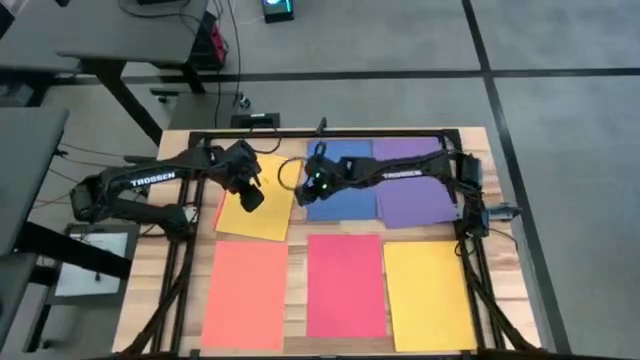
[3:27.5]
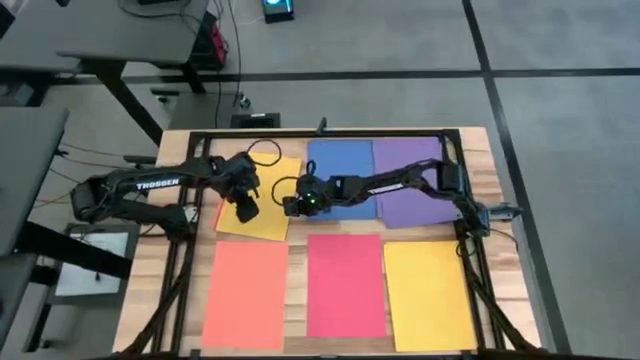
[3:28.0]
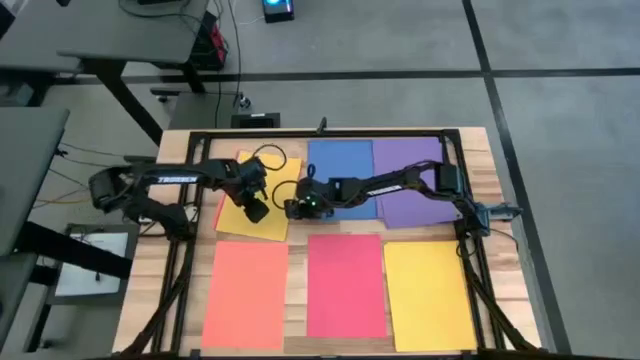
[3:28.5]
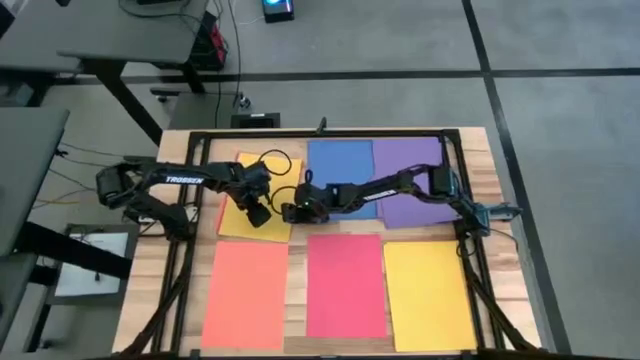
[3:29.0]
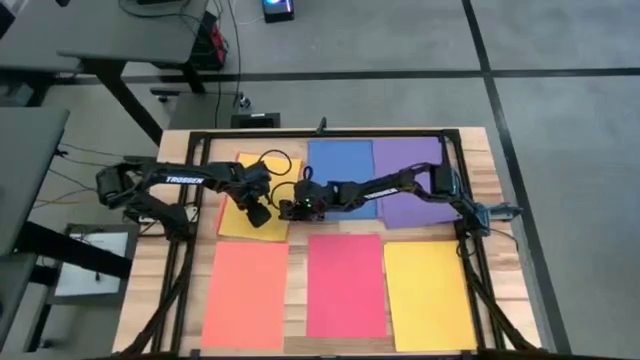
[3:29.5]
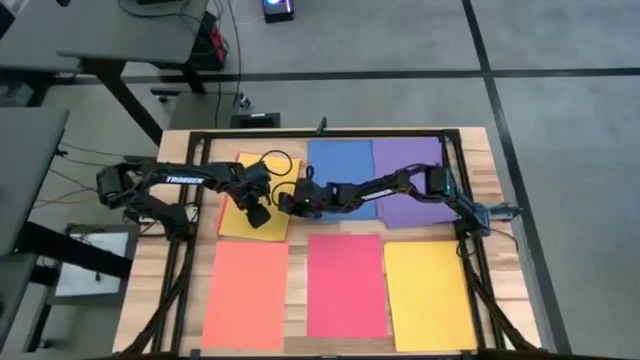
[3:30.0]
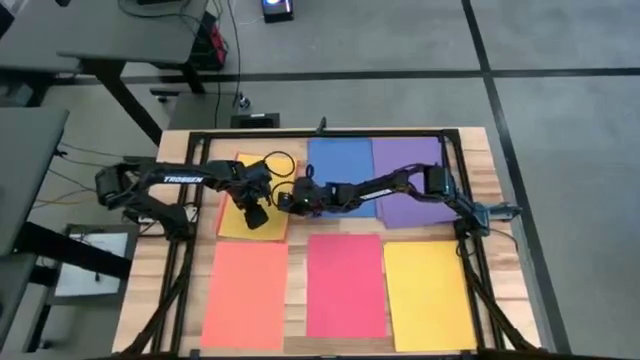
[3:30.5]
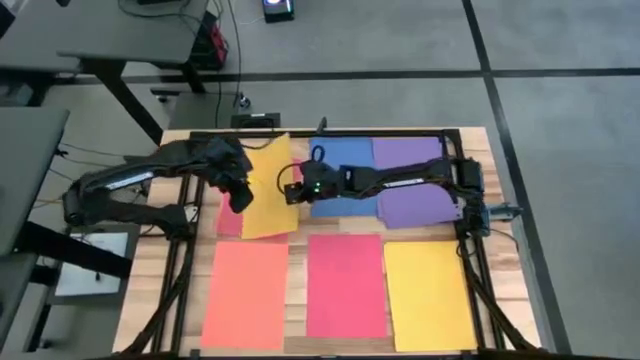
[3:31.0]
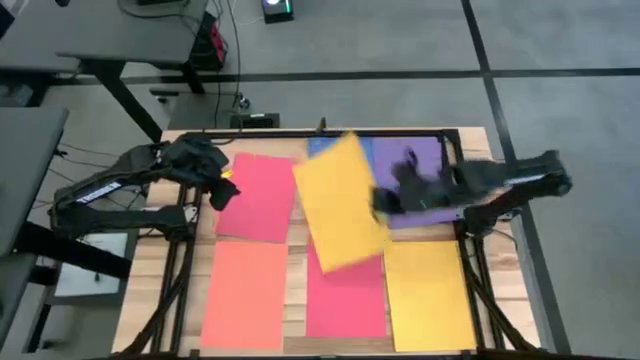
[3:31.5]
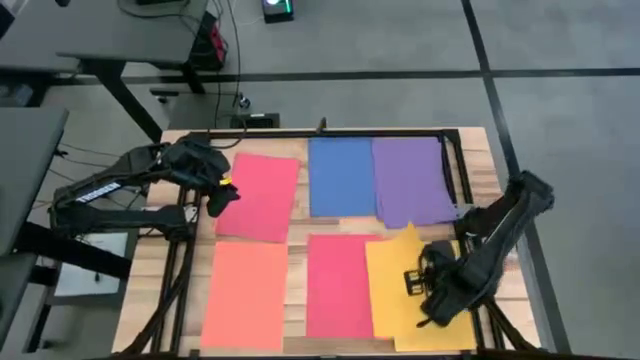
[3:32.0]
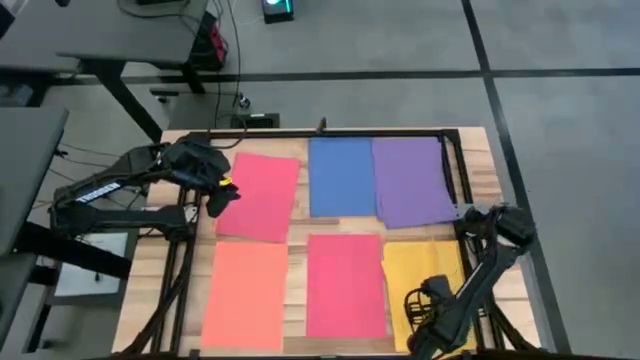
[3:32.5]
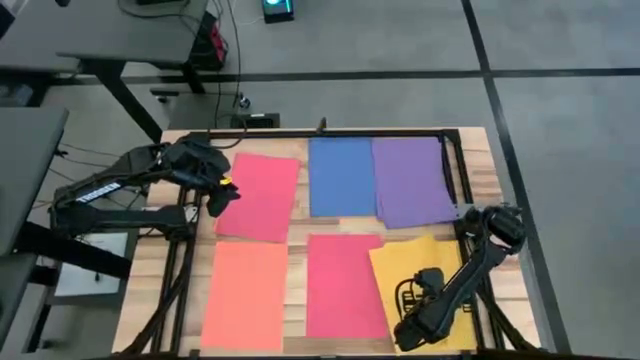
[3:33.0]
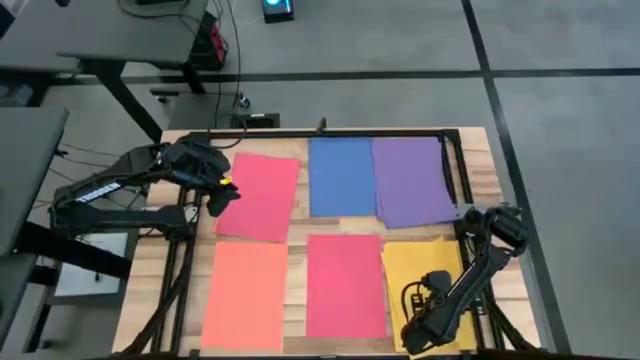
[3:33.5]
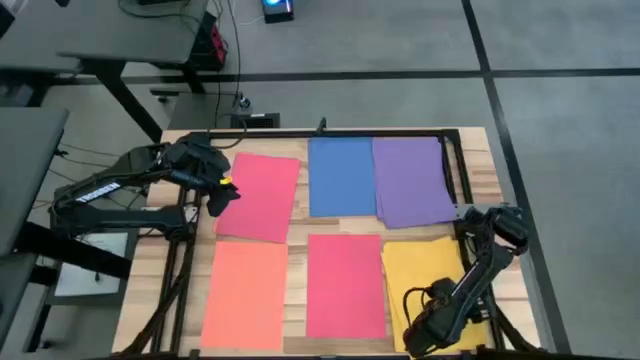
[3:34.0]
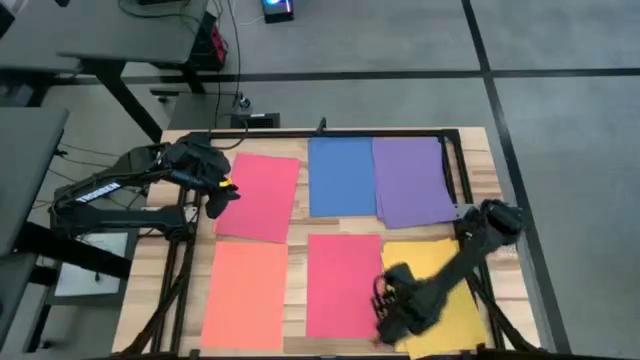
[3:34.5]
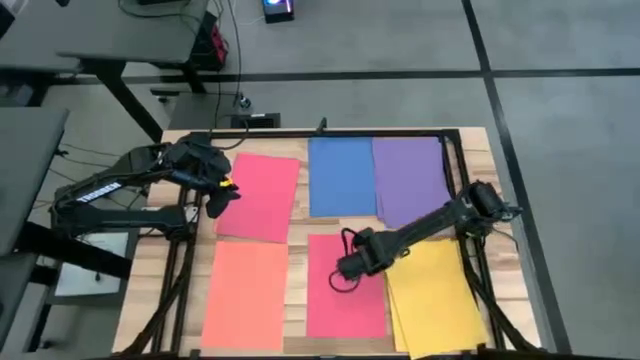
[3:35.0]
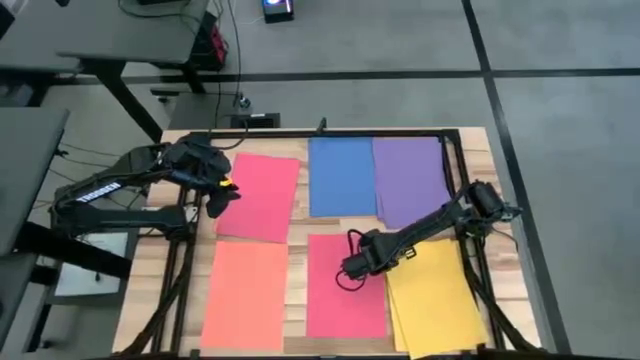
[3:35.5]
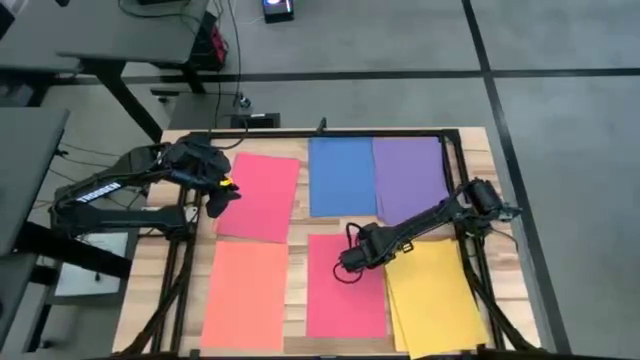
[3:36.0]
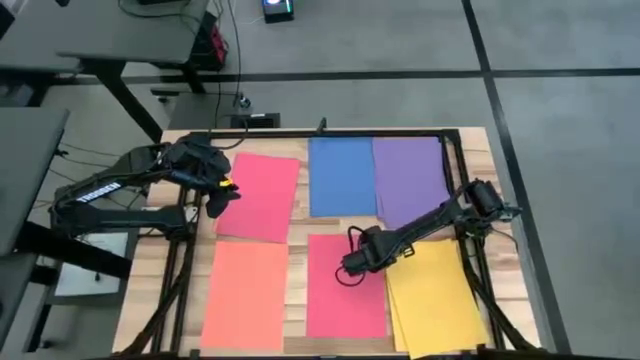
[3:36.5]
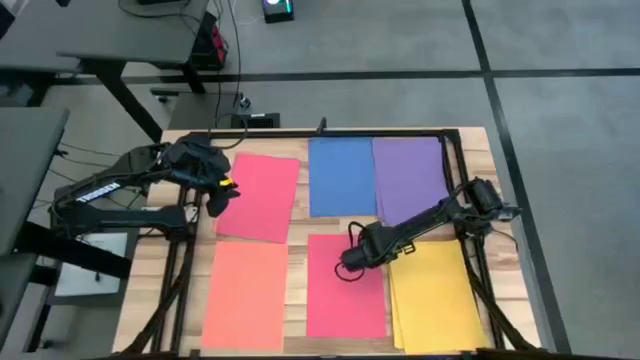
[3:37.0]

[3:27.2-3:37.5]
Task: Organize paper
Stack the yellow paper on the bottom right yellow papers

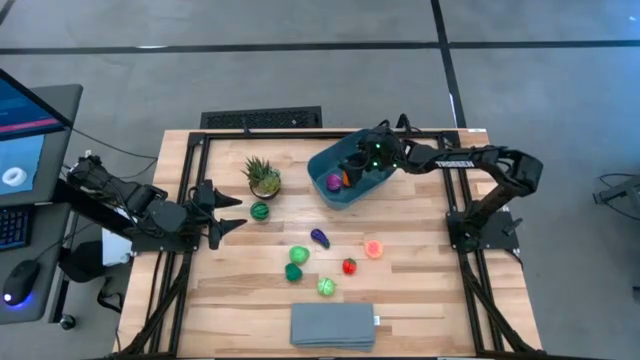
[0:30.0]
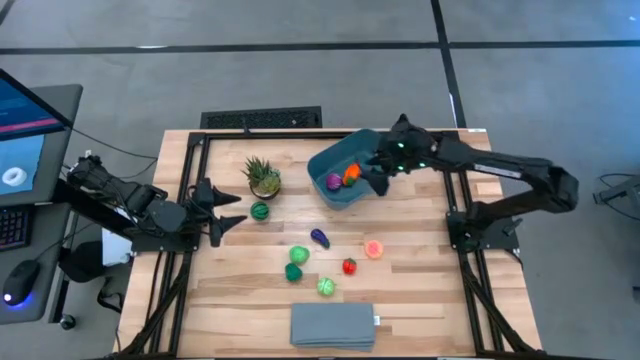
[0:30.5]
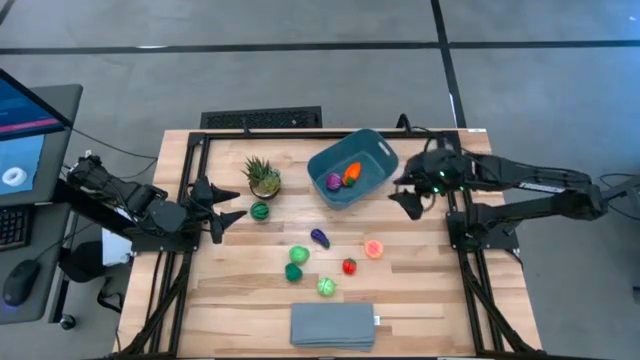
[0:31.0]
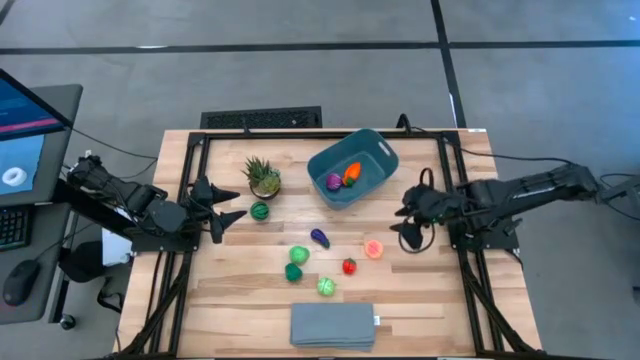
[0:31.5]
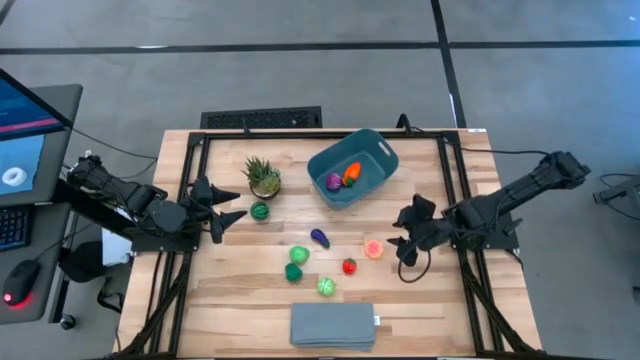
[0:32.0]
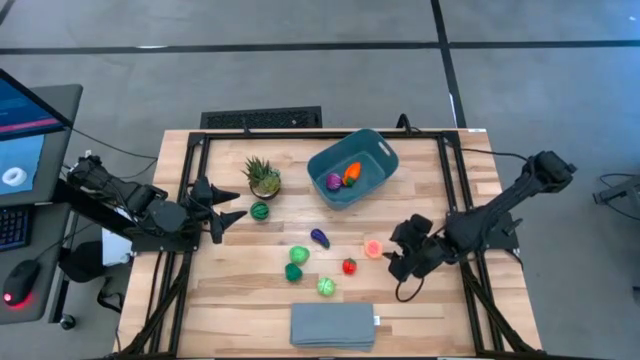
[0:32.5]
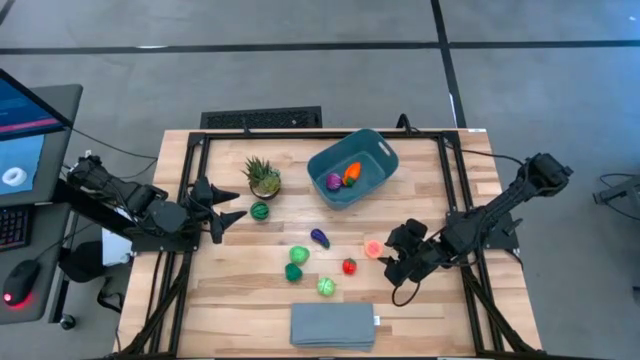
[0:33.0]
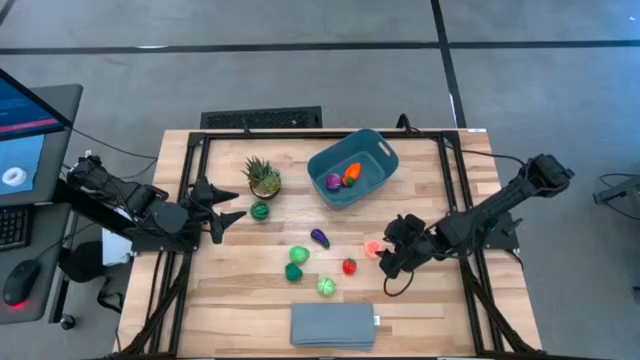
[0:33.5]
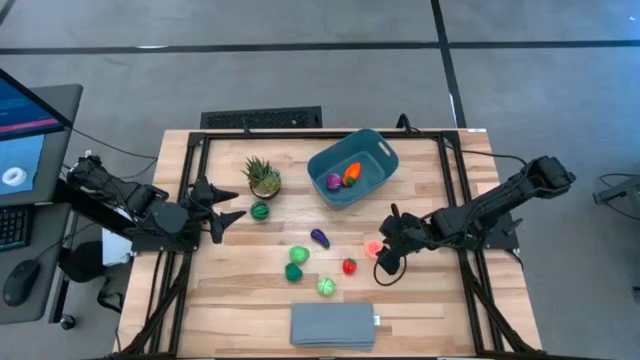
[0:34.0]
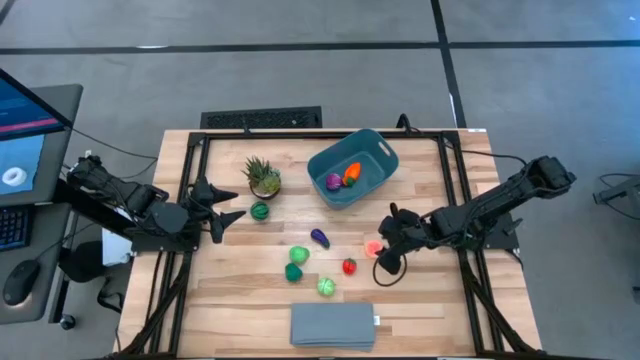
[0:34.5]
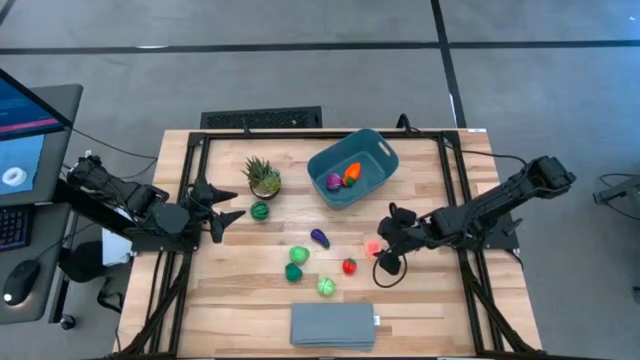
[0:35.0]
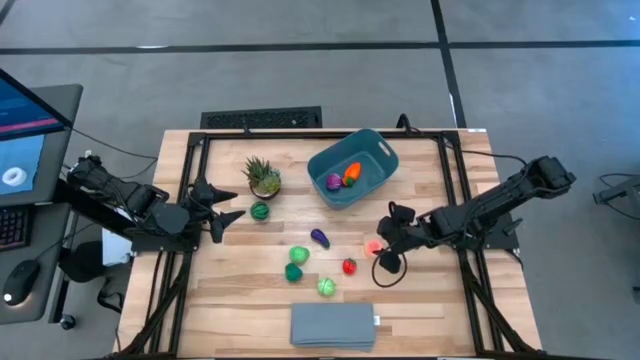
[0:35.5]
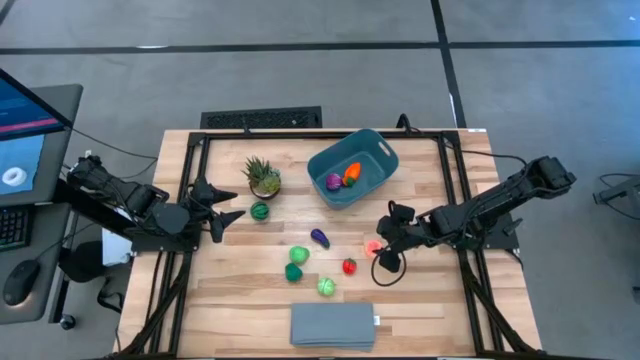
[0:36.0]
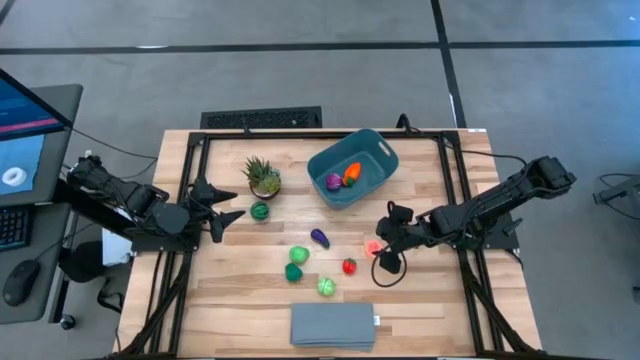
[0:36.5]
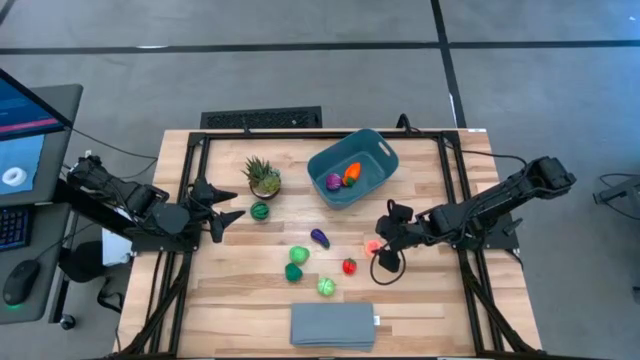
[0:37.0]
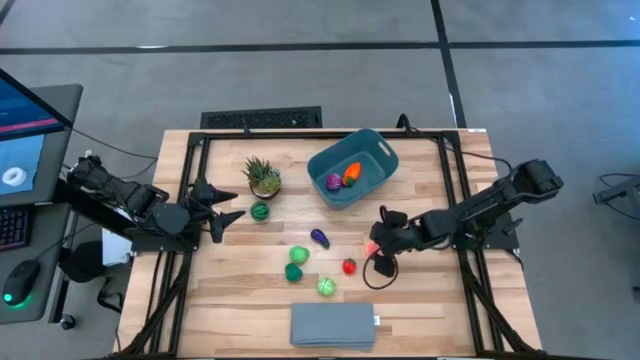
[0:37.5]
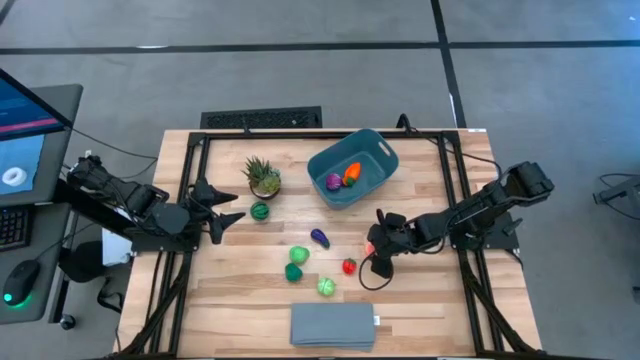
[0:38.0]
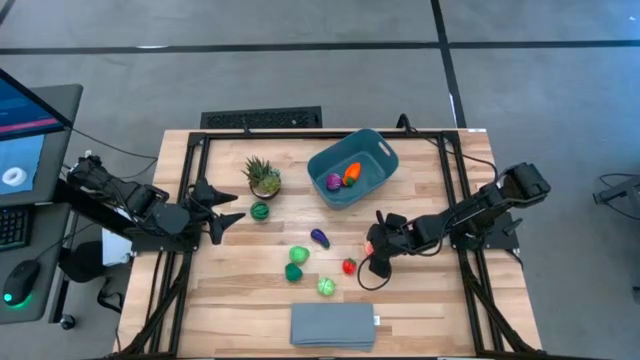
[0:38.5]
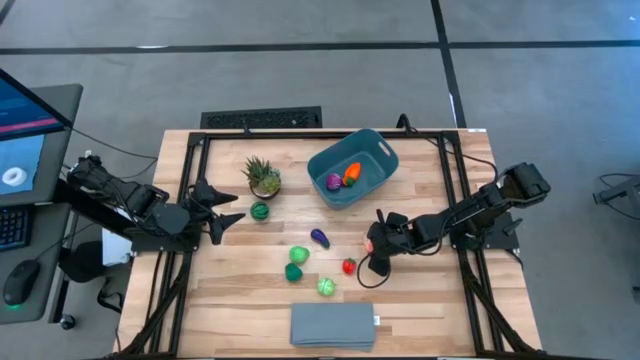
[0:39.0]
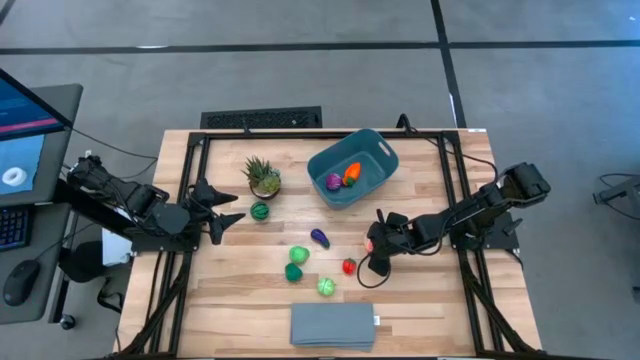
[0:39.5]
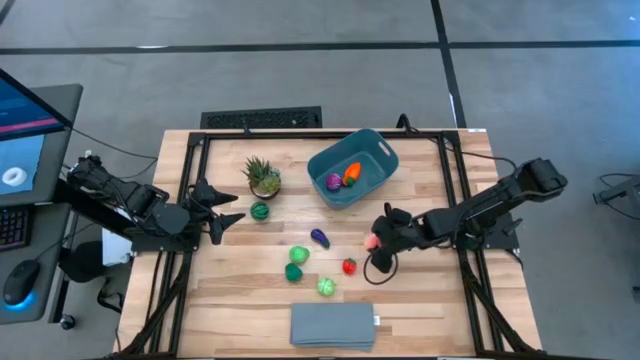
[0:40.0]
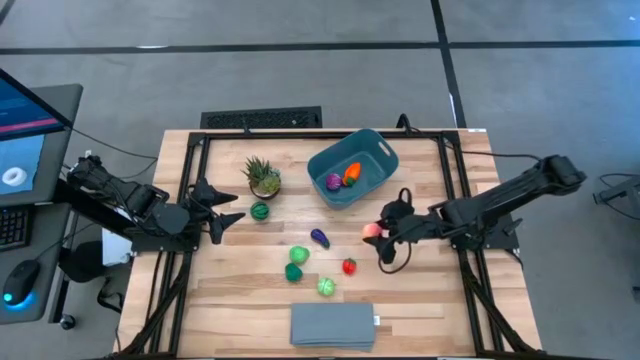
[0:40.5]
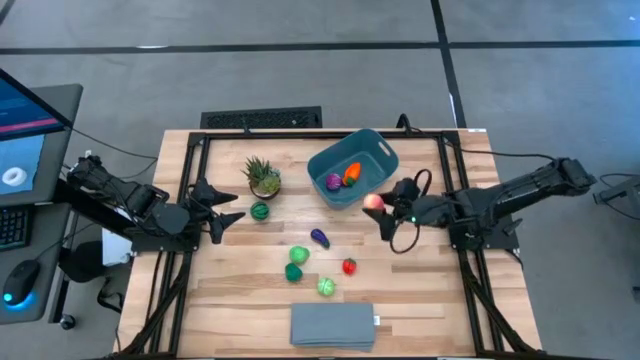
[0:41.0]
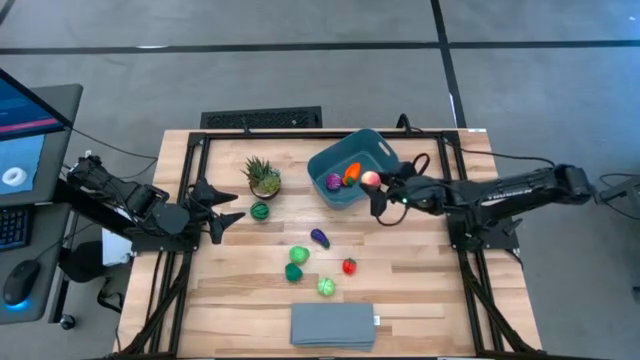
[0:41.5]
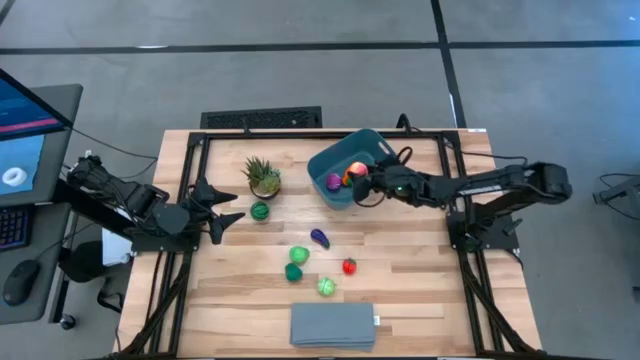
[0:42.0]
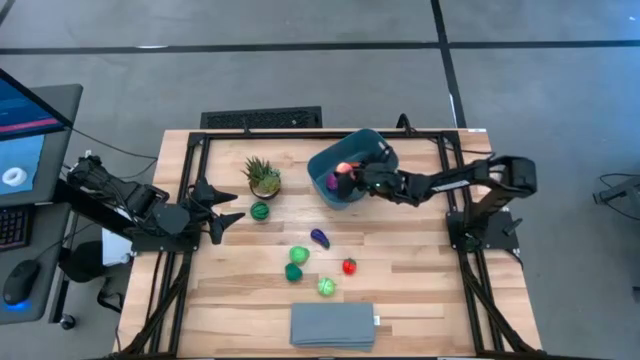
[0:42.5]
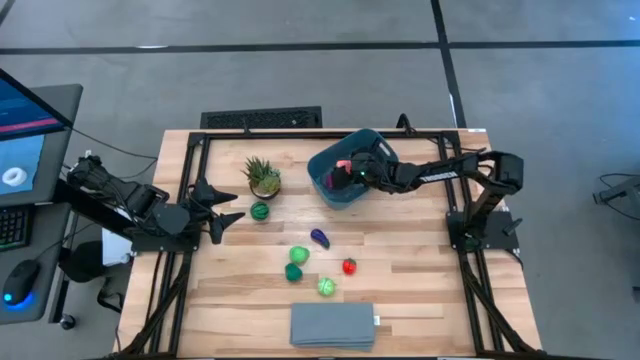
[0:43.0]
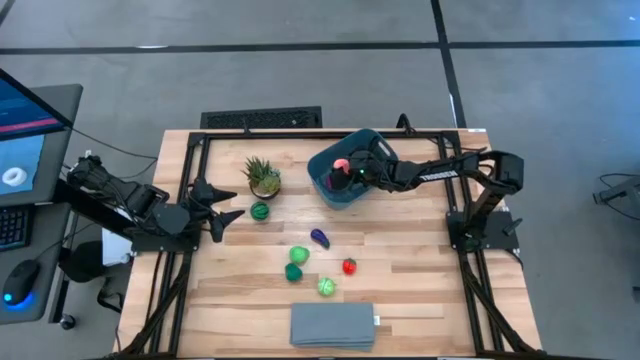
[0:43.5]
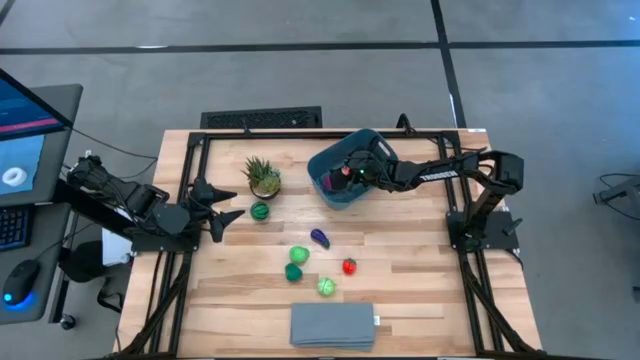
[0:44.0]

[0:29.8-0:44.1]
Task: Pick and placing Produce into tupperware
Put the peach into the bin
